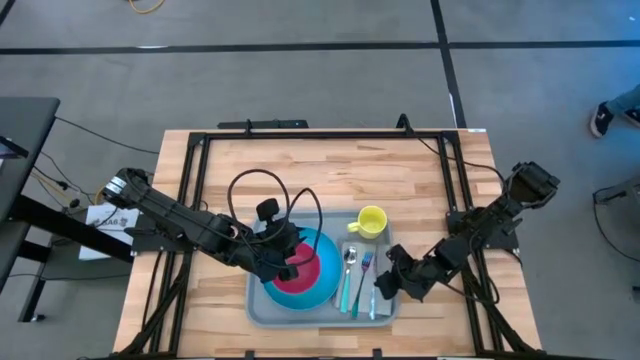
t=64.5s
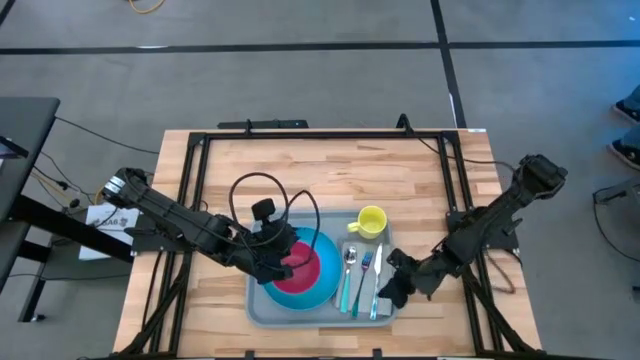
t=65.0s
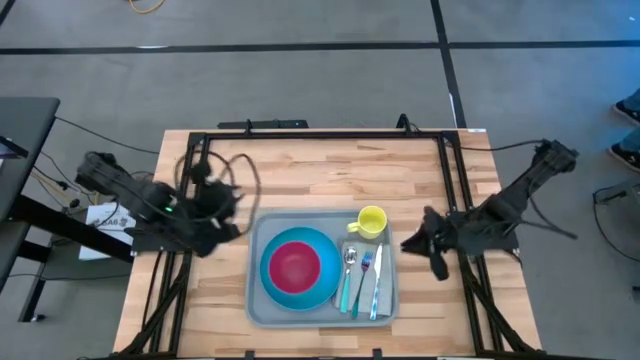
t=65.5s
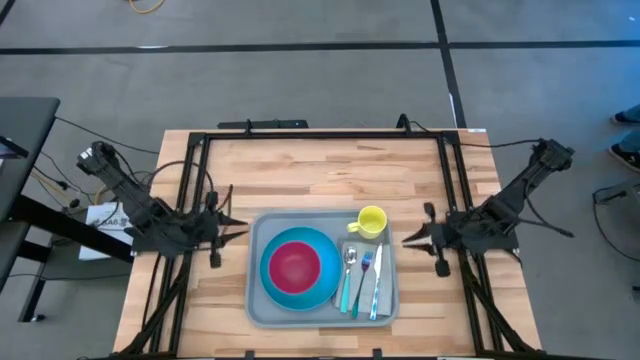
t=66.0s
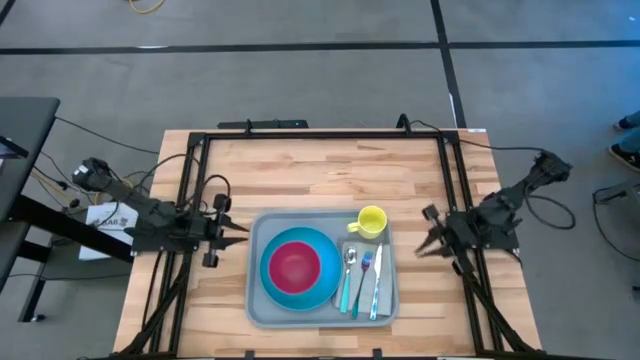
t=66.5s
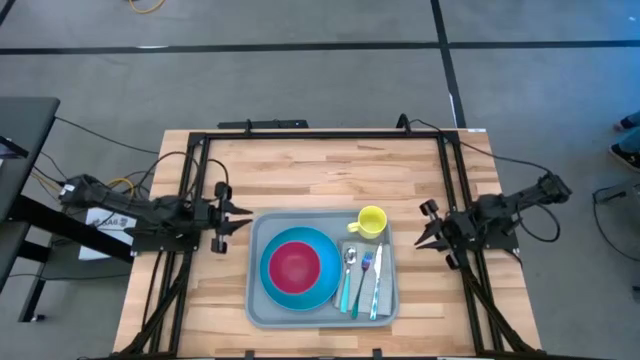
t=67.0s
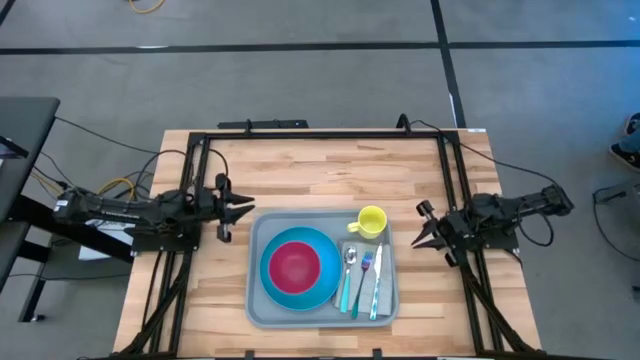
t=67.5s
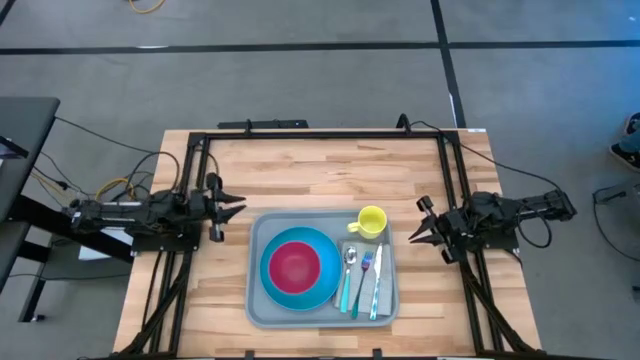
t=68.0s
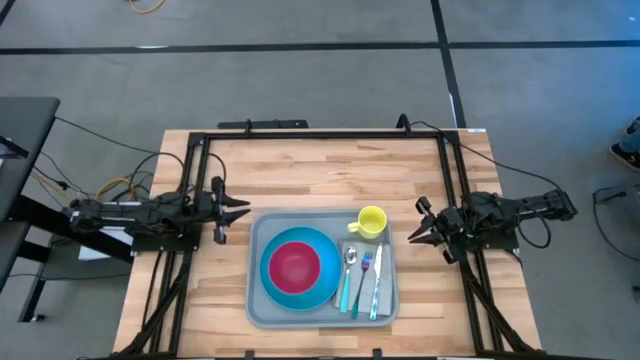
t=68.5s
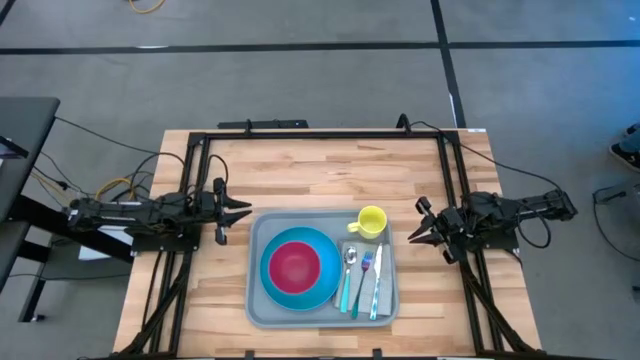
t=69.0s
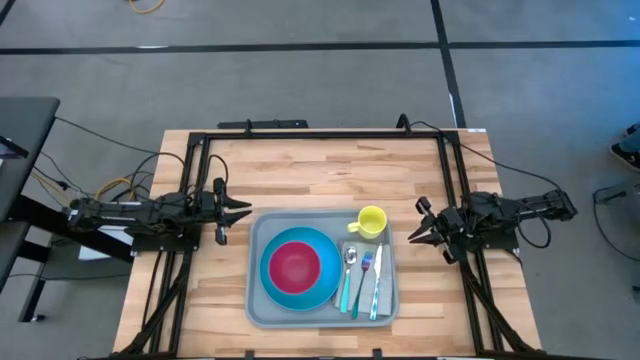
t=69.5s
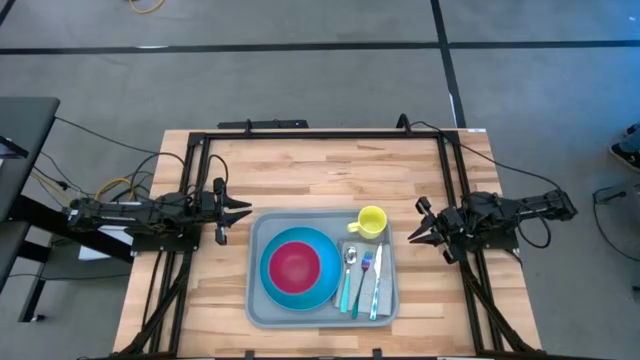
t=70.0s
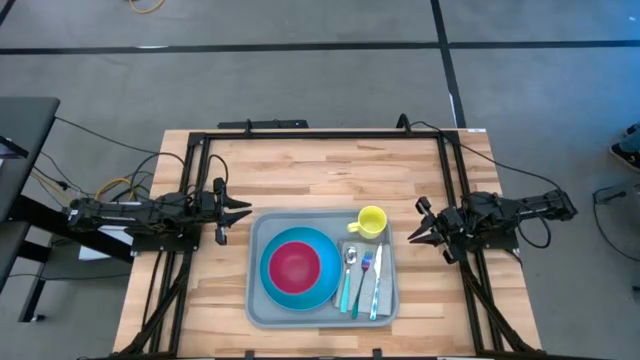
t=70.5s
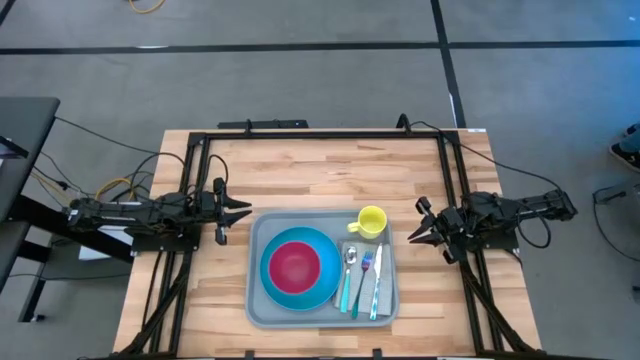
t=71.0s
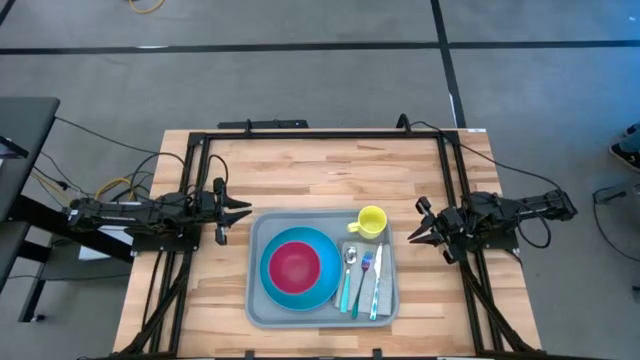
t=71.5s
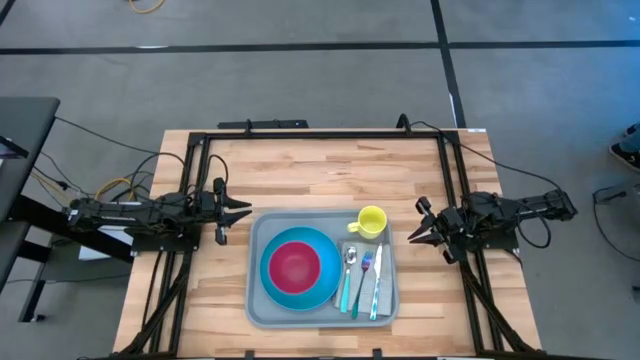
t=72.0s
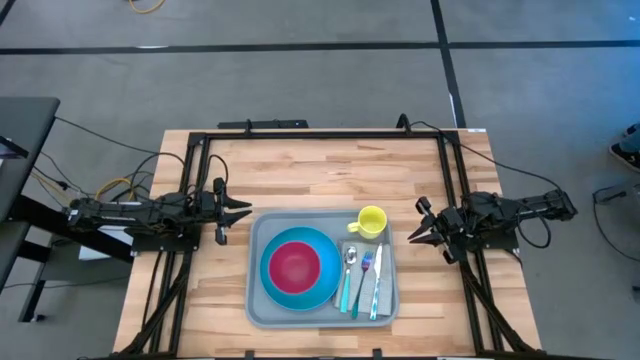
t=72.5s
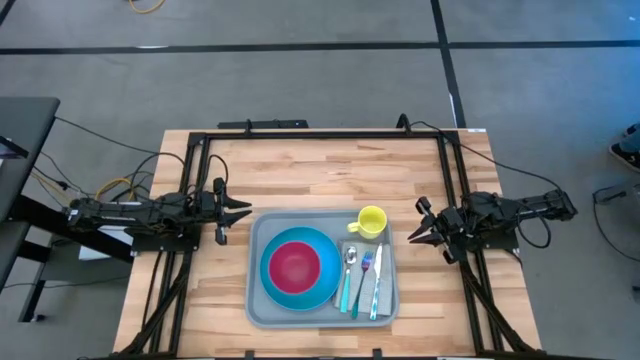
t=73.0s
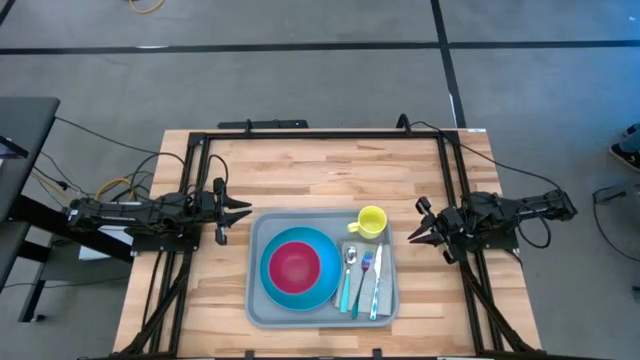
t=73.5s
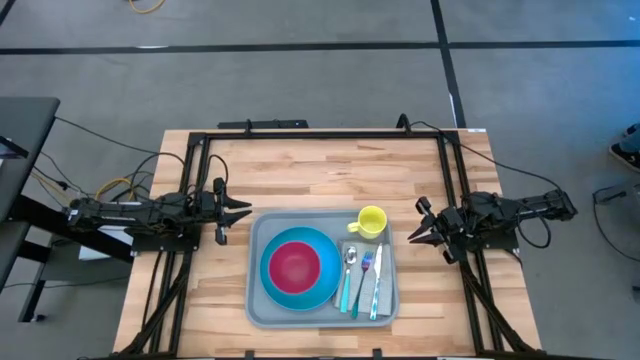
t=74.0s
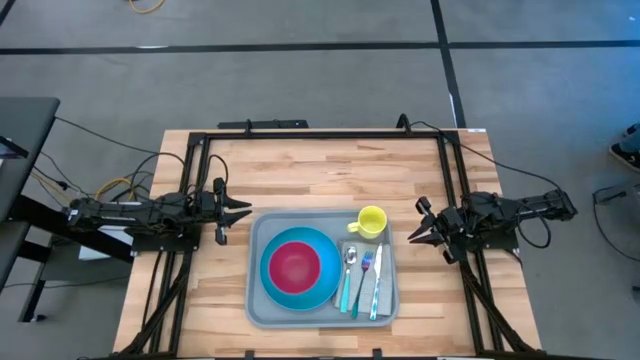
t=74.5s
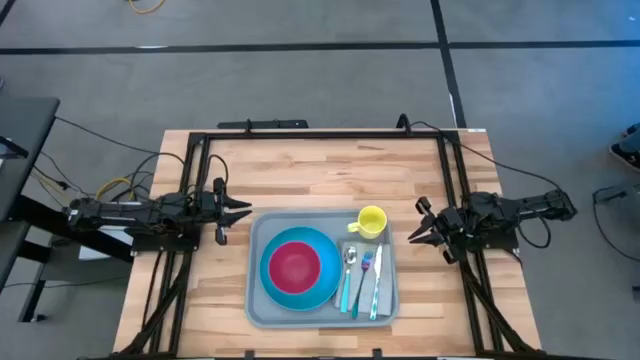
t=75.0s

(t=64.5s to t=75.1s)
Task: Set up tray
Return to Home Position

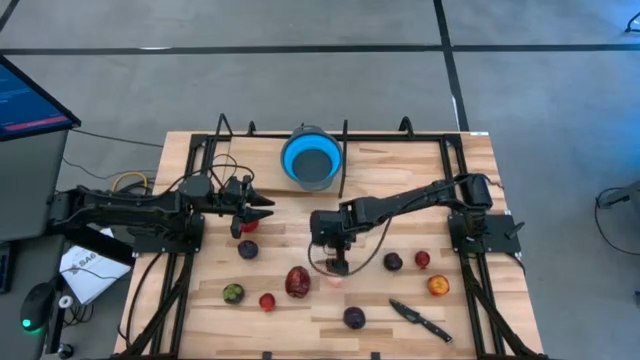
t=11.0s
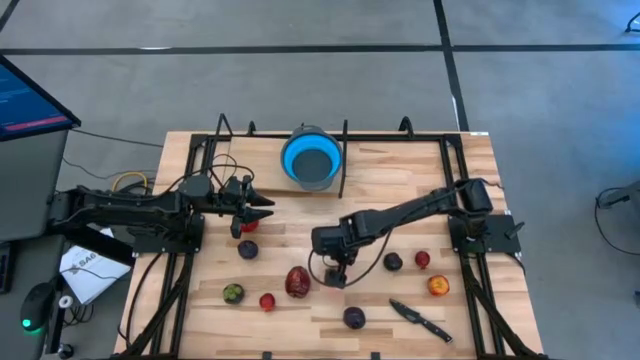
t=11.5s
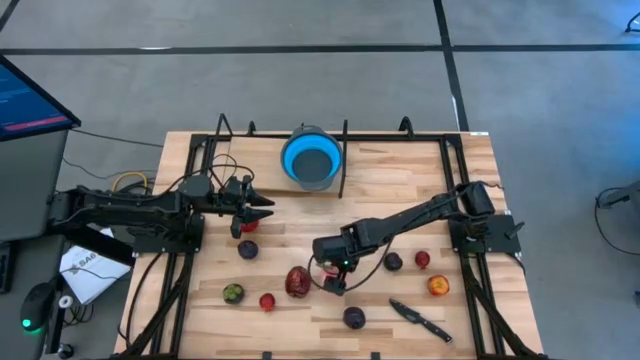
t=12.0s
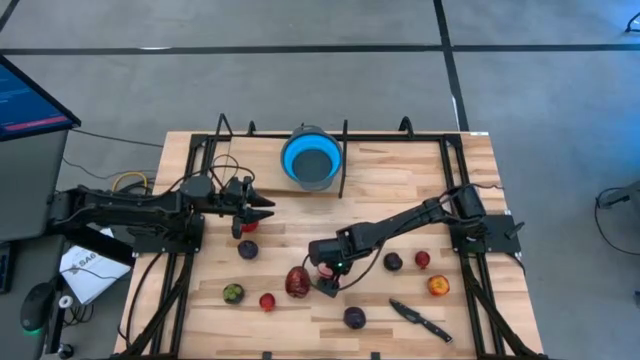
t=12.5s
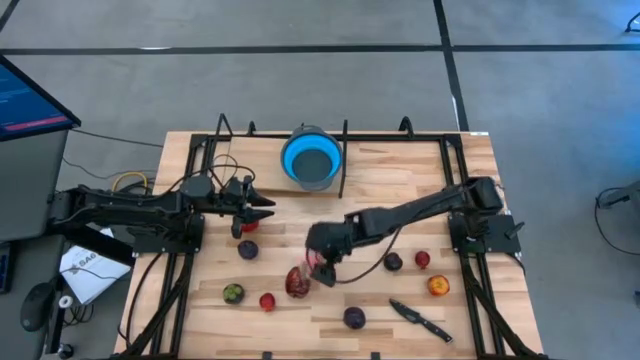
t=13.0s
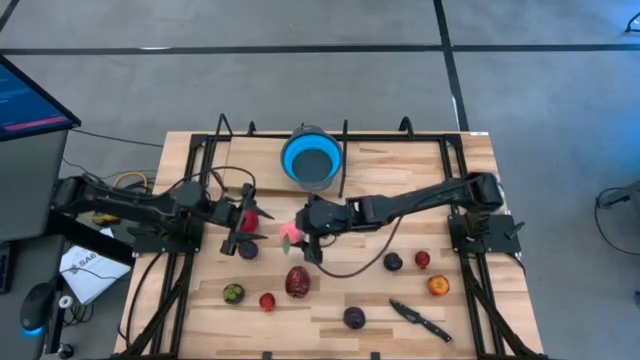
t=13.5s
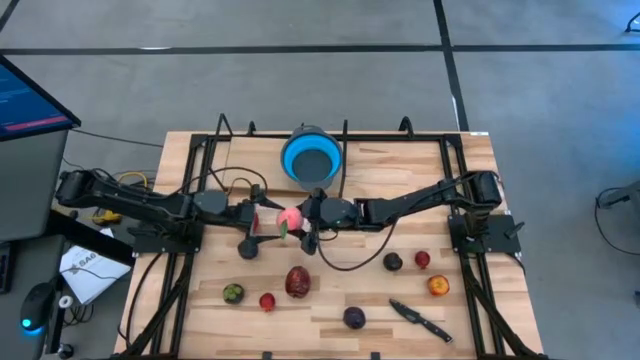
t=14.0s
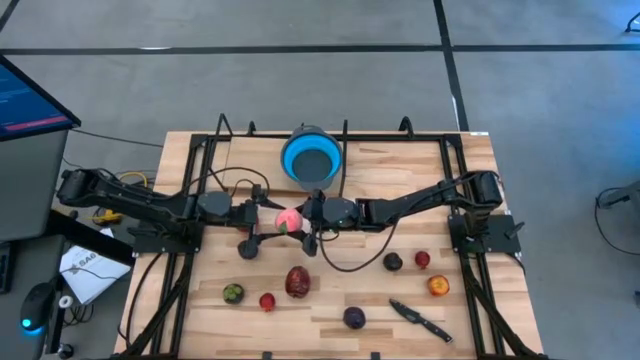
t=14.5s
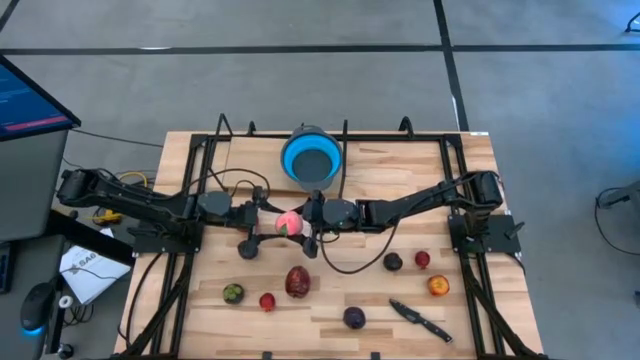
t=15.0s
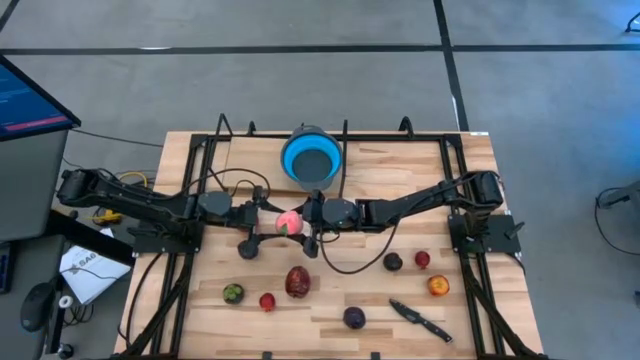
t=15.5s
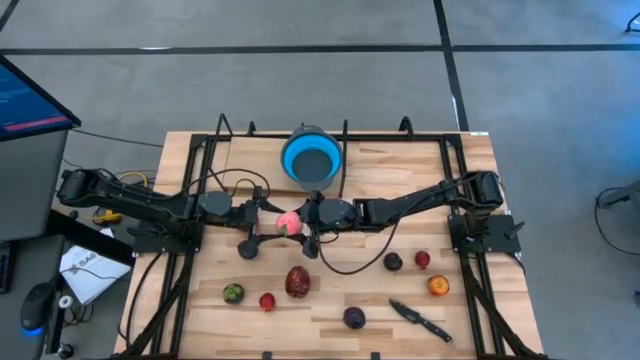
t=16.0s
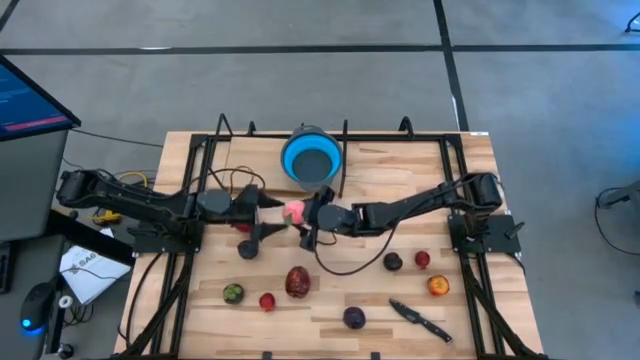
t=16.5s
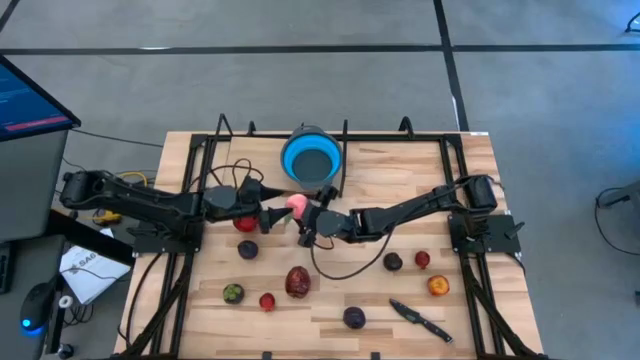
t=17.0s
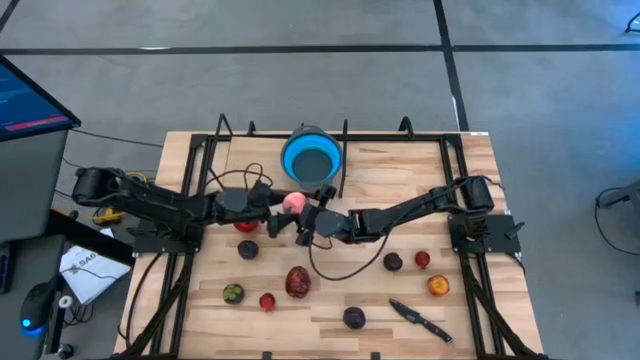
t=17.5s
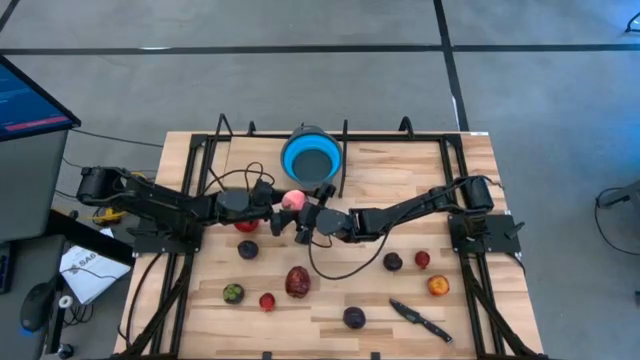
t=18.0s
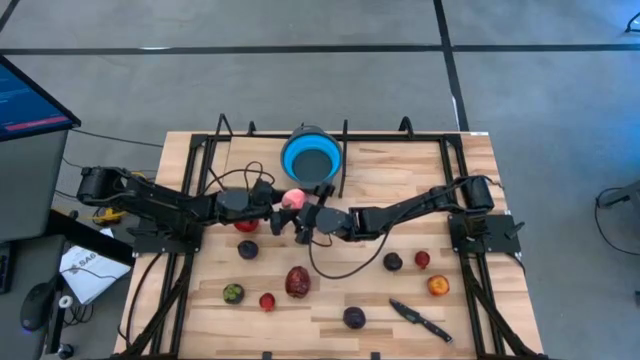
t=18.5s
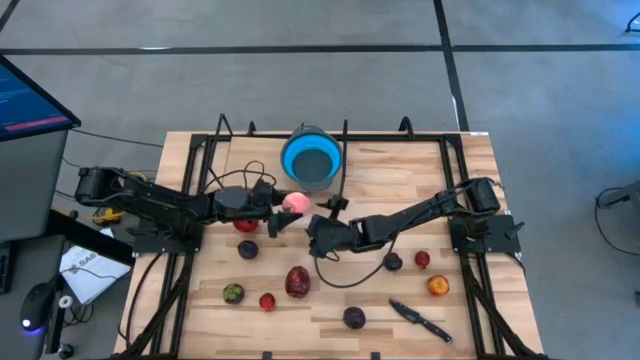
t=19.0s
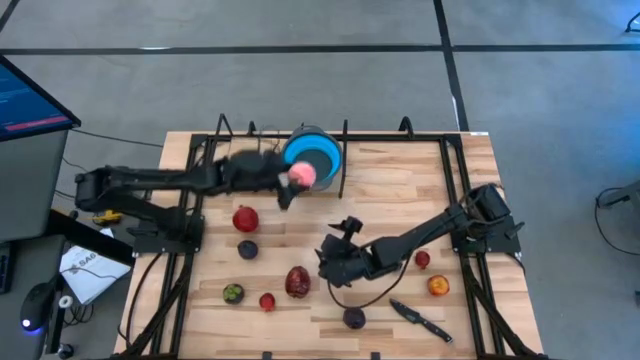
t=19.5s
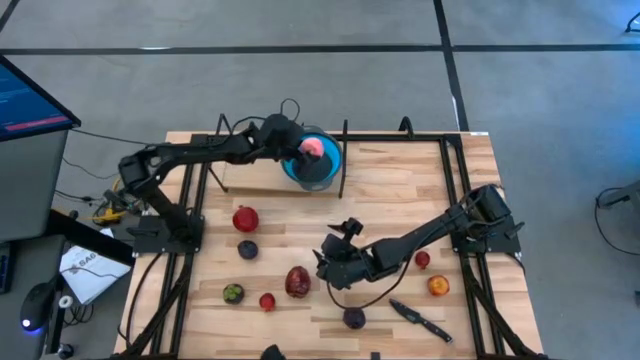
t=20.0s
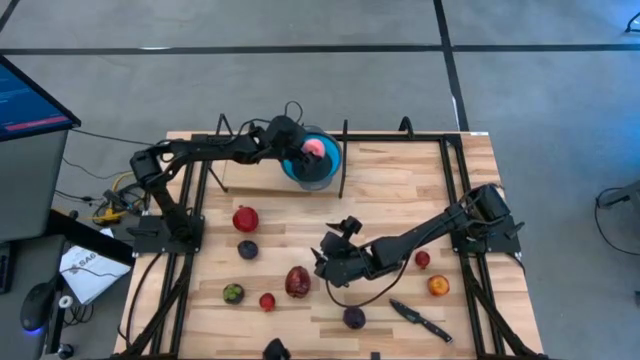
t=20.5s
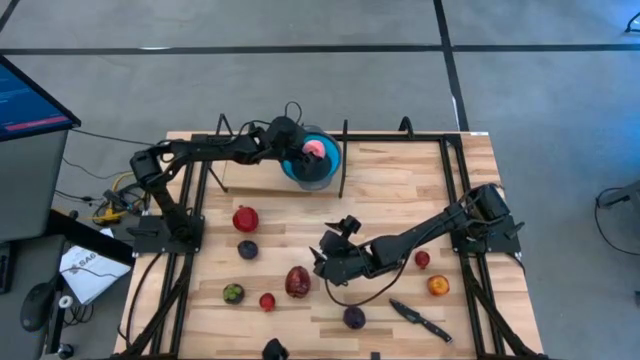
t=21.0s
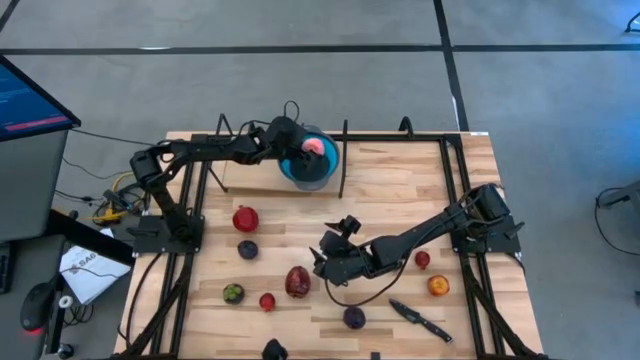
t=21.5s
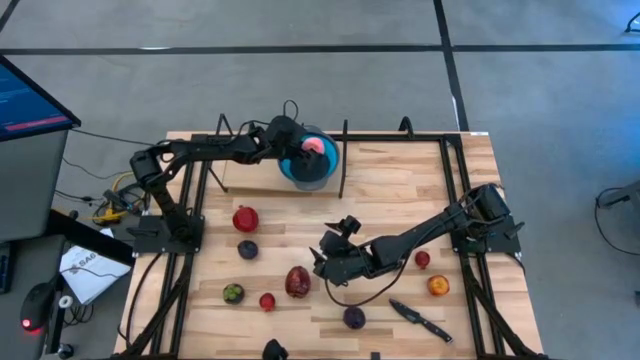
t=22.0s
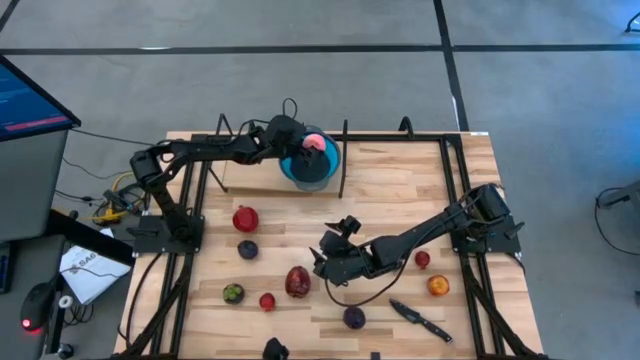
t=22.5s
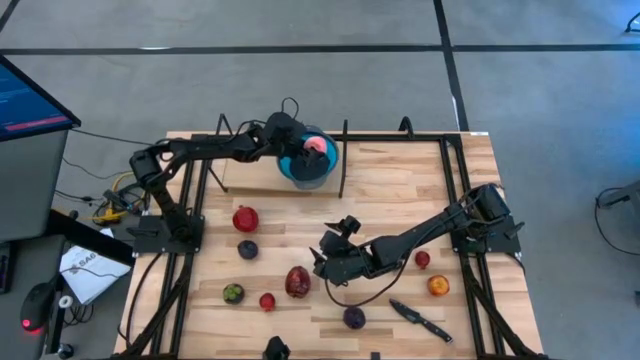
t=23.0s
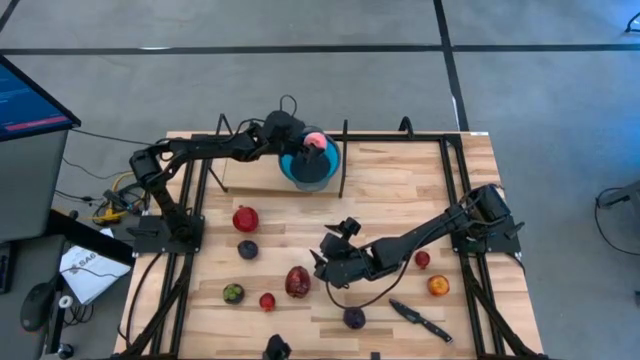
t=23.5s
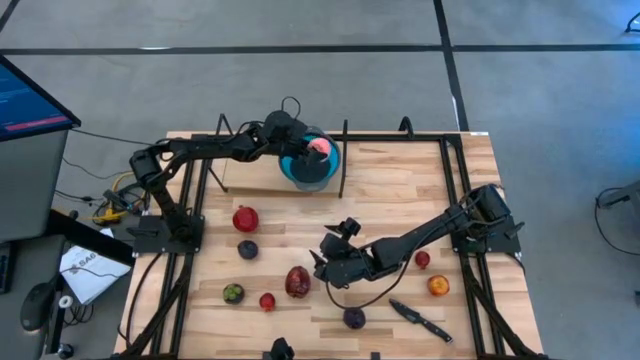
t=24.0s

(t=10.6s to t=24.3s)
Task: Pick & Place Fruit
Put the pink peach into the blue strainer bowl on the shelf
